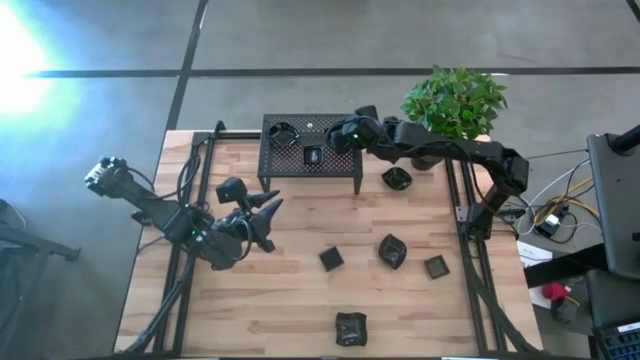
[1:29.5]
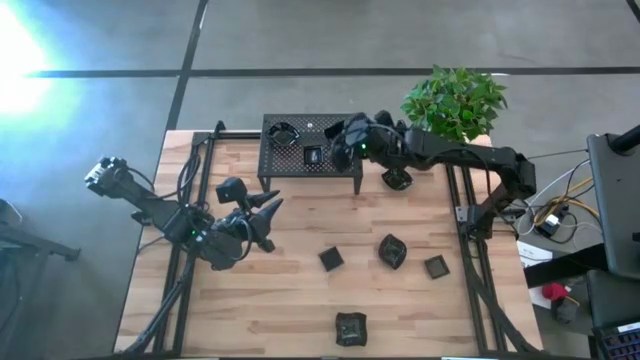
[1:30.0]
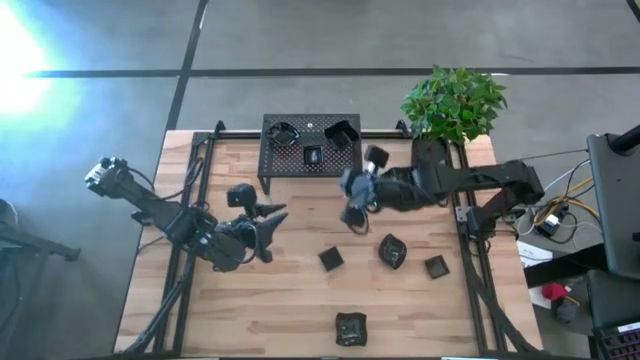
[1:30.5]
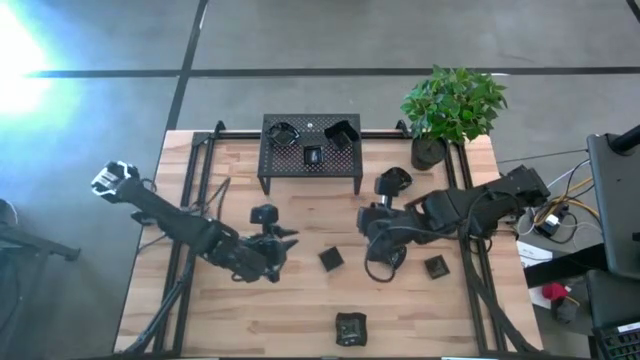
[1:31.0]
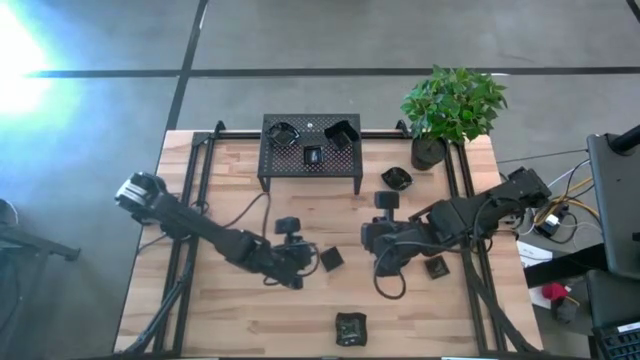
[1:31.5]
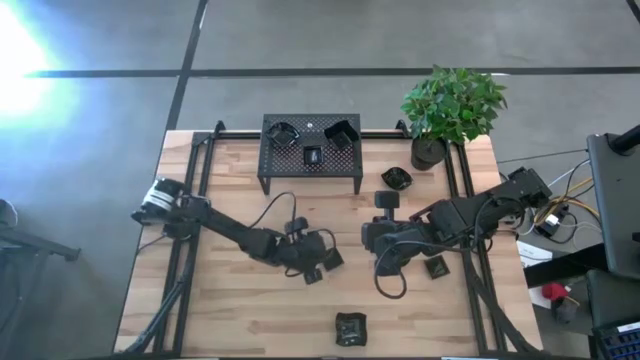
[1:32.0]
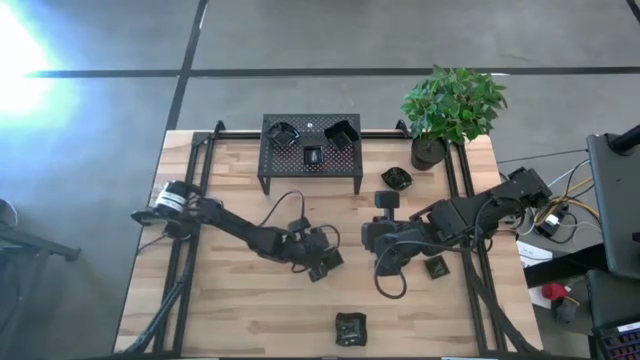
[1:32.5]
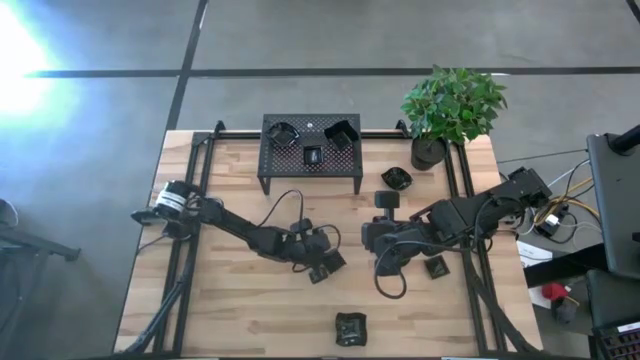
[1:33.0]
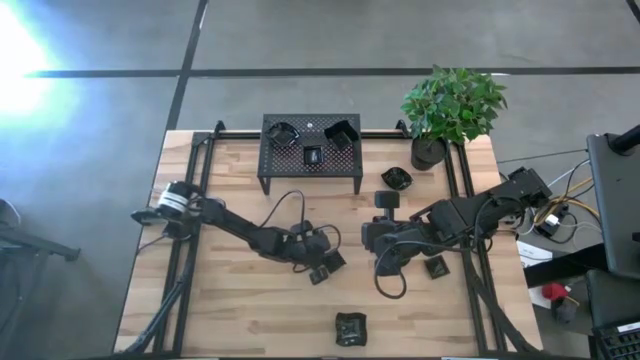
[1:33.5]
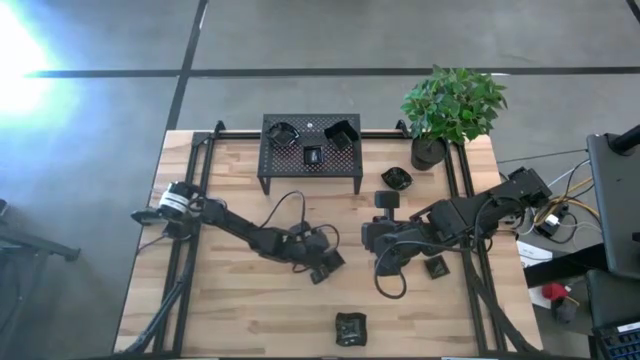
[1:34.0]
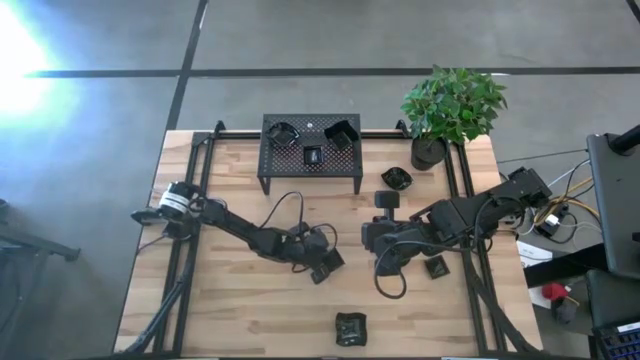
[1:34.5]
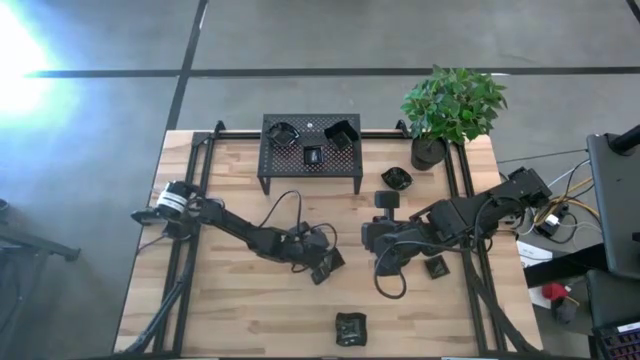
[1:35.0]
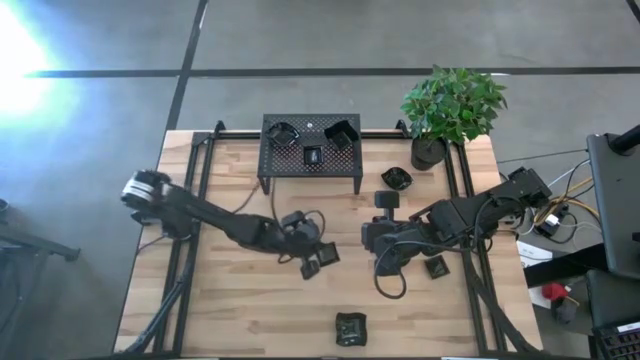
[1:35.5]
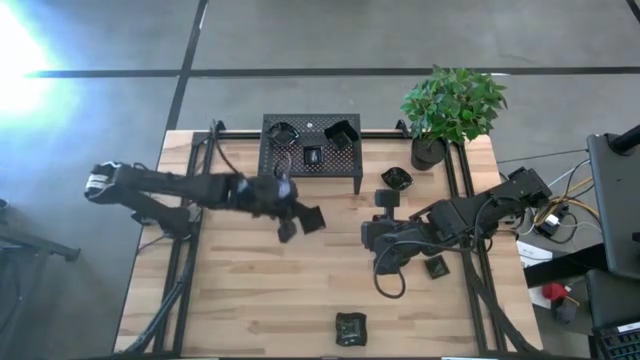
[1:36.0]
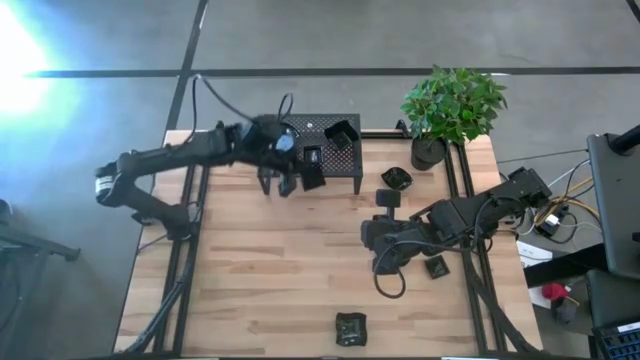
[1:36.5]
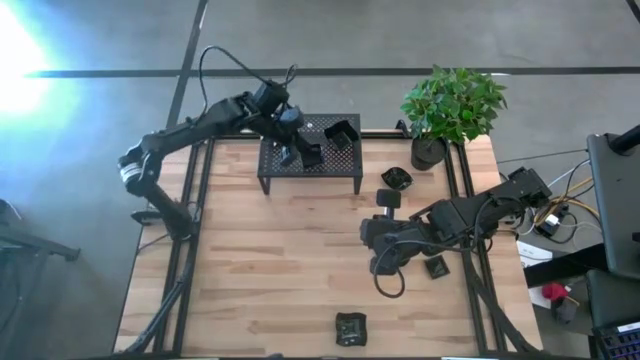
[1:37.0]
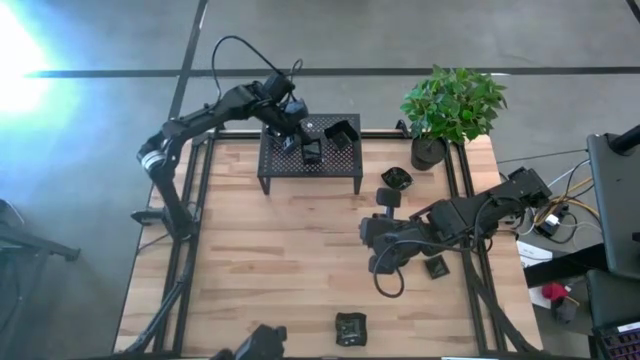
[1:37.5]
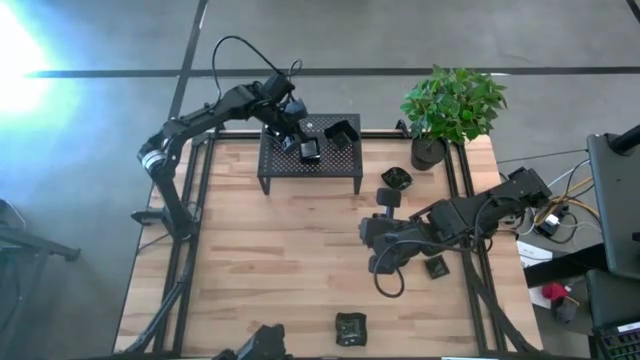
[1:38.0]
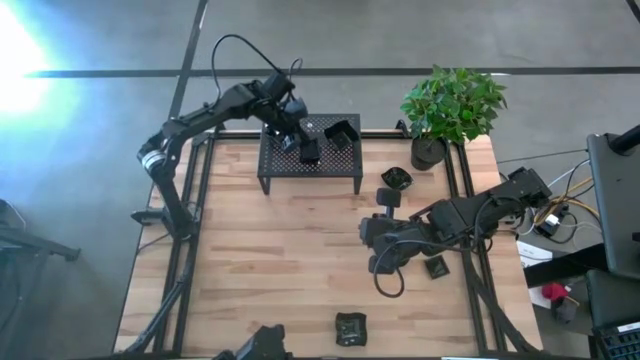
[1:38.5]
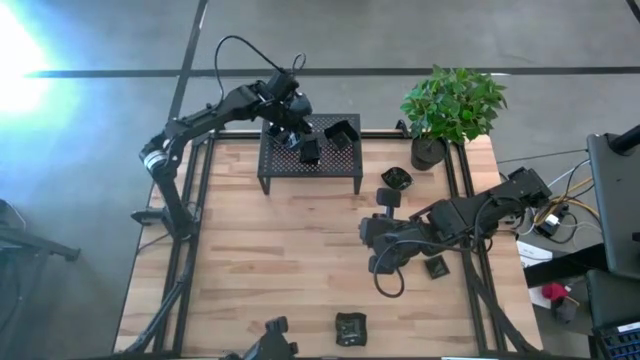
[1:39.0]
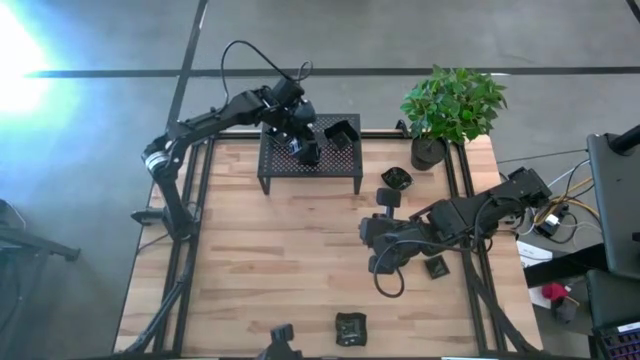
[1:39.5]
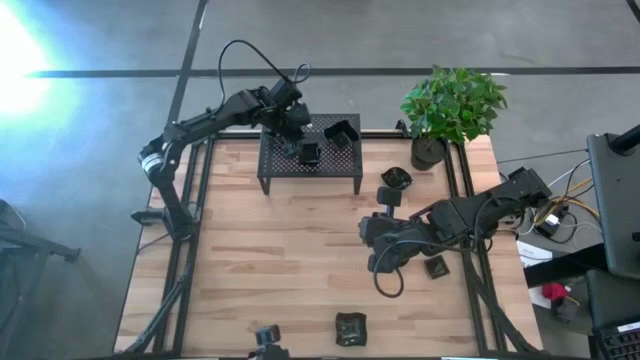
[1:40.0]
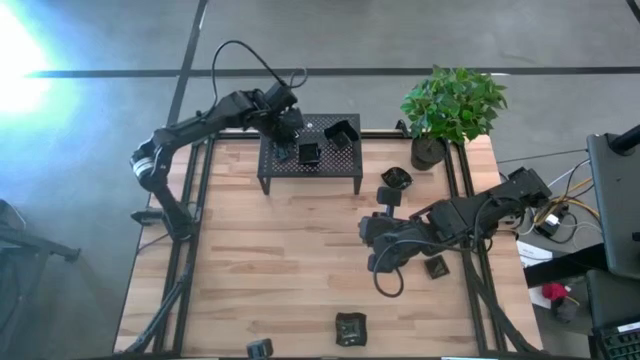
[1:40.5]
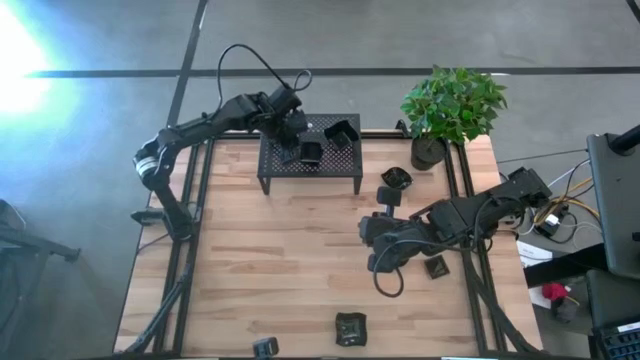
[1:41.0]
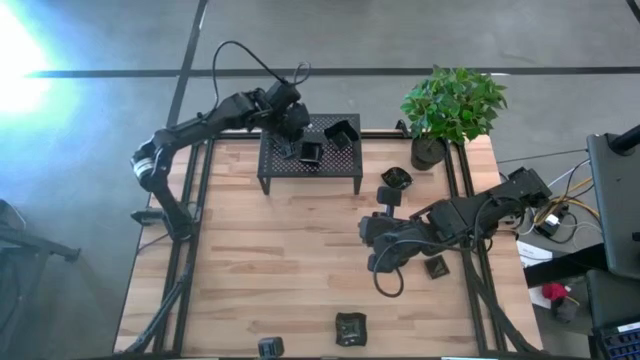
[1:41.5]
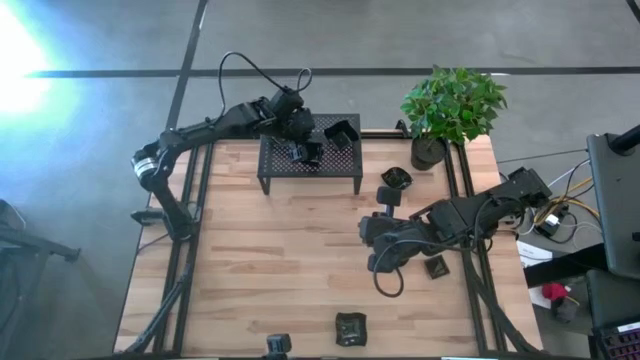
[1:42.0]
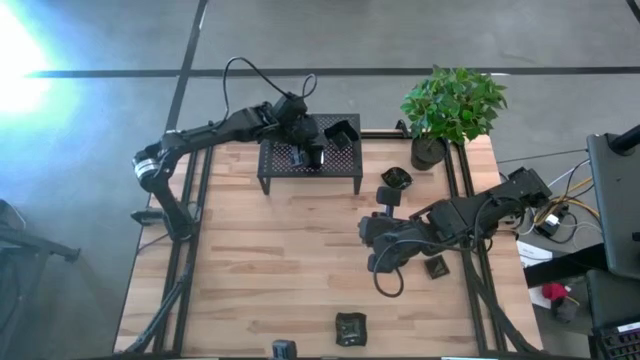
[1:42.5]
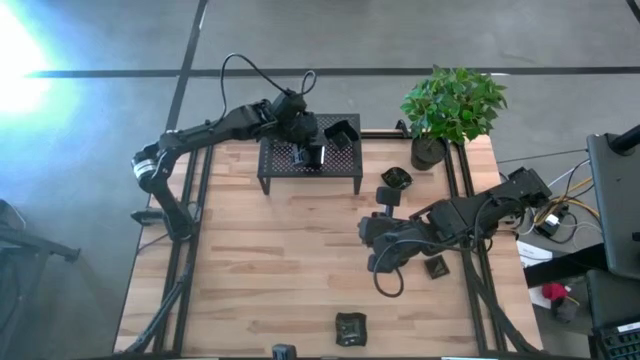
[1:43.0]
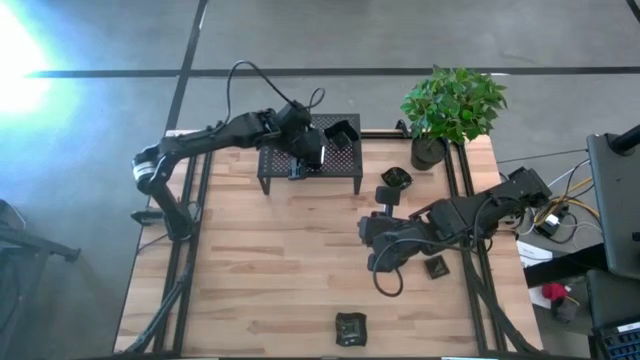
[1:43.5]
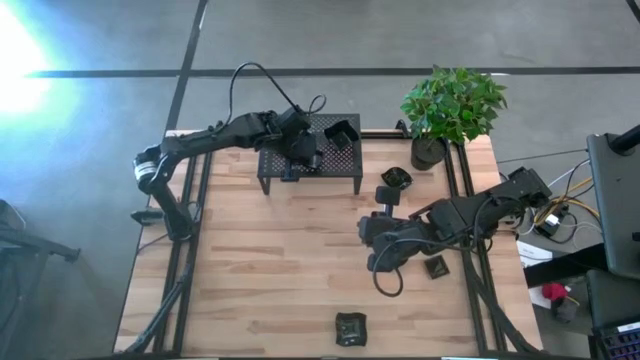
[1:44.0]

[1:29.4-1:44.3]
Task: Pick & Place Mini shaped plates
Stack the square plate on top of the square plates on the shelf

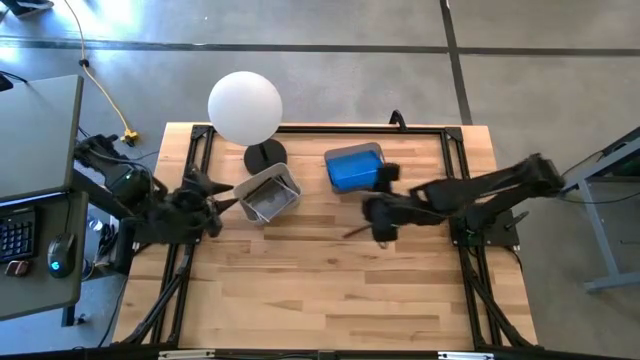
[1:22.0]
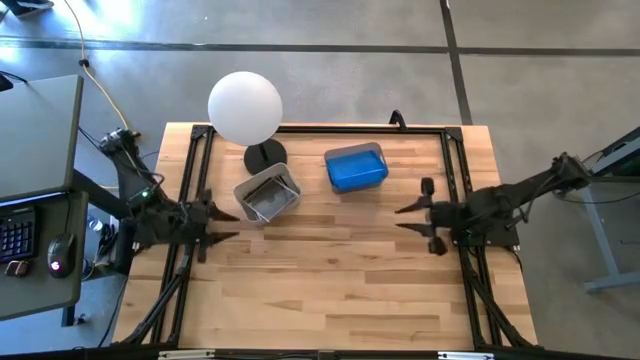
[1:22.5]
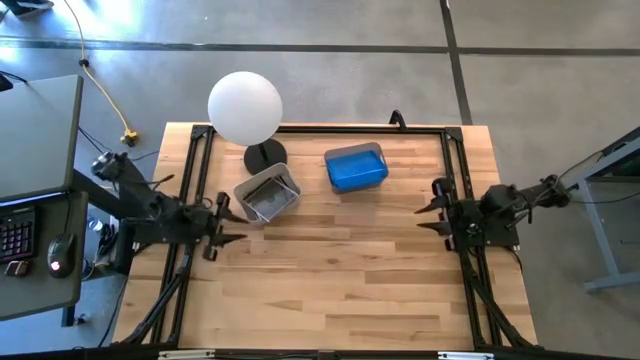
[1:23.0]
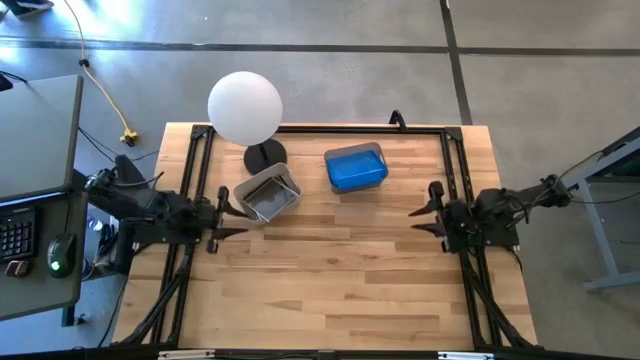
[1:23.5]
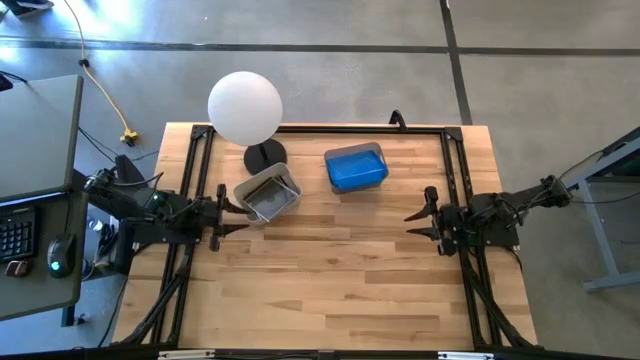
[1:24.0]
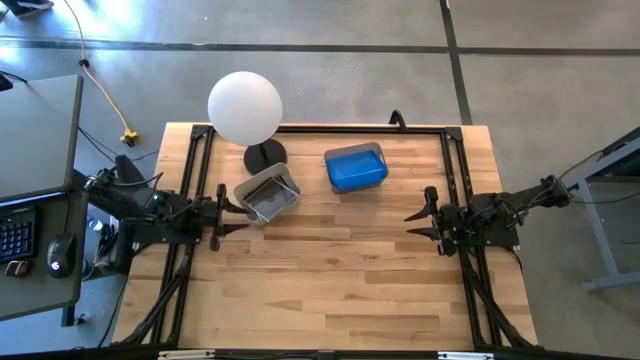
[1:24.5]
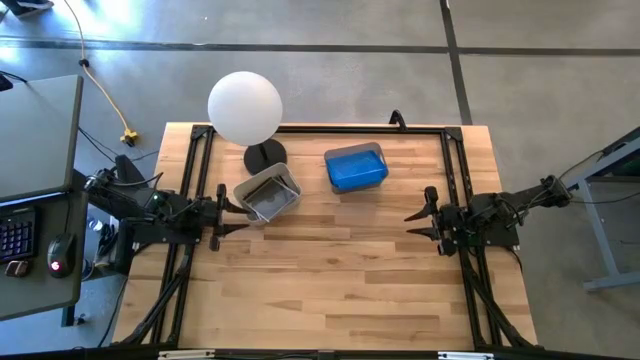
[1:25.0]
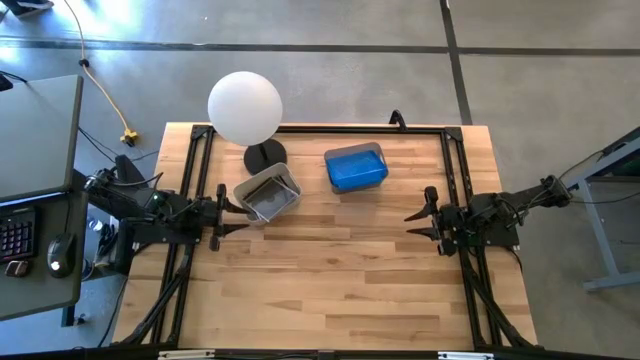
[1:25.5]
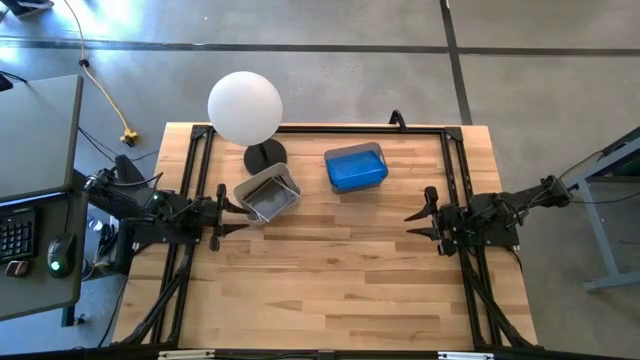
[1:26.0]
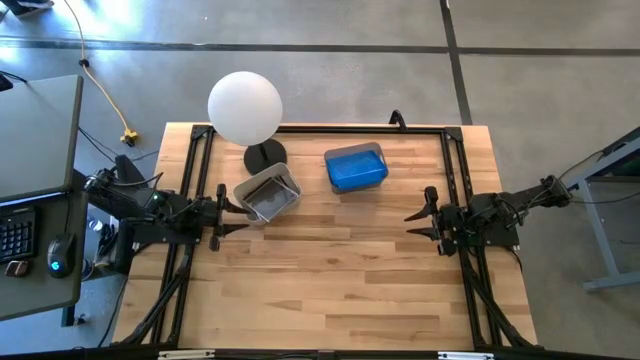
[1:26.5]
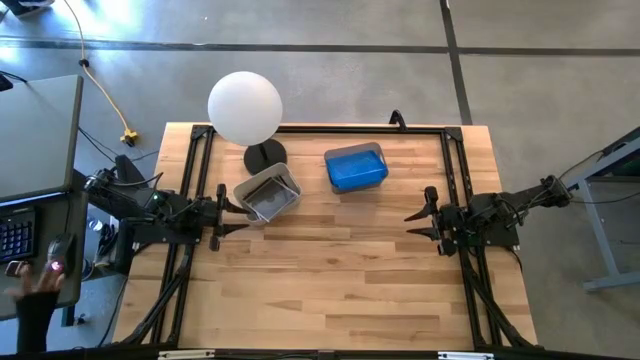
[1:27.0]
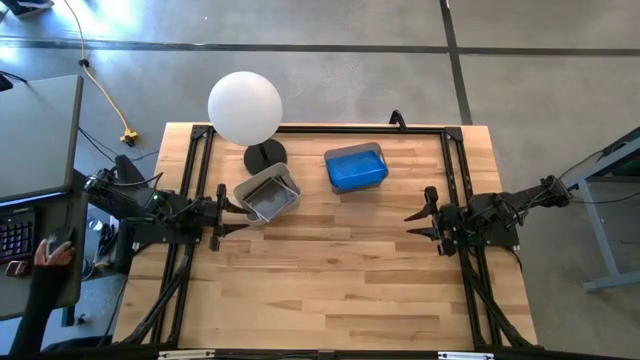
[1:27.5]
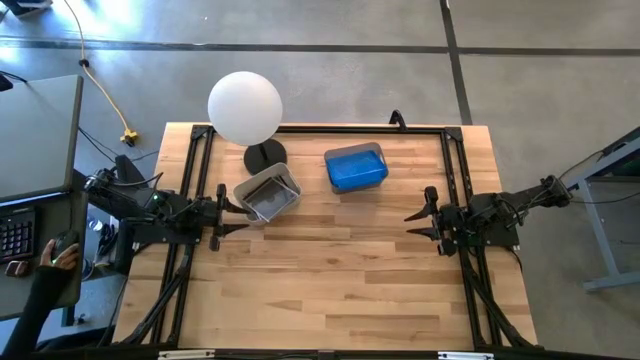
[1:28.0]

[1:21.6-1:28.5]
Task: Pick & place jewel cases by type
Return to Home Position

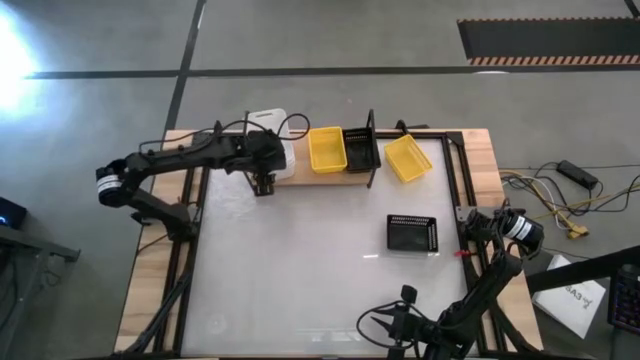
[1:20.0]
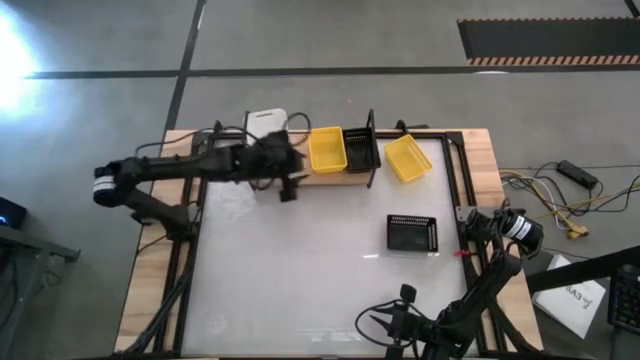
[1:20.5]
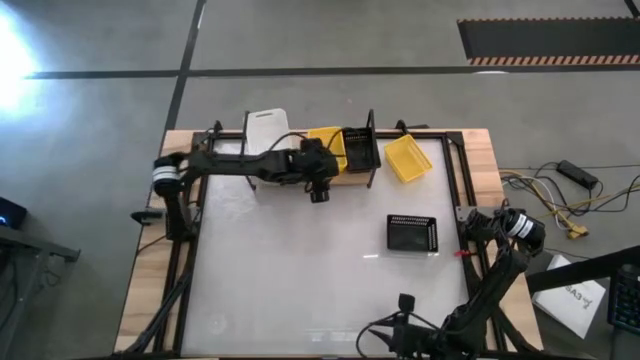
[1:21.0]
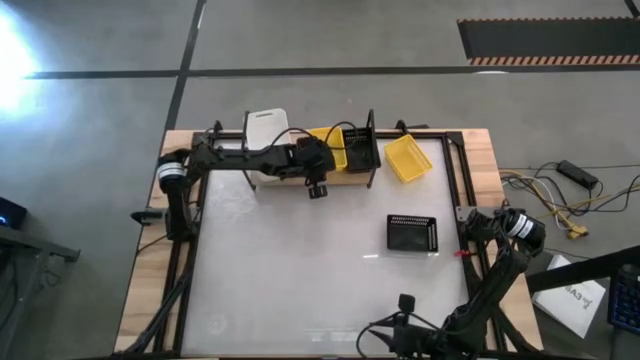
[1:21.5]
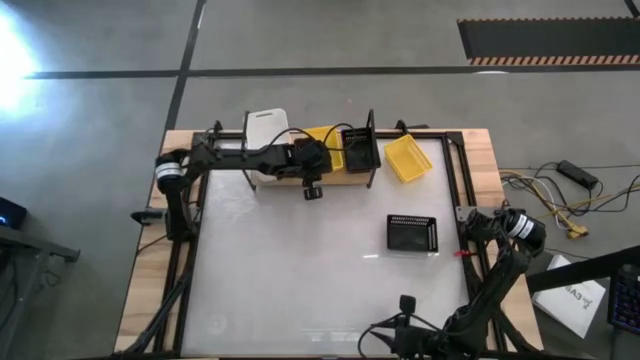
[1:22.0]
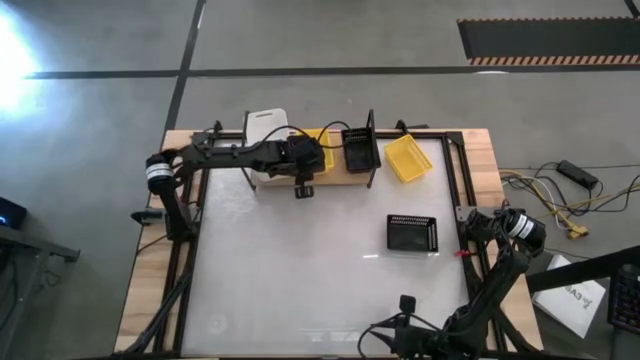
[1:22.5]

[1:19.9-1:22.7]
Task: Stack baskets on shelf by color
Adjust the stacked yellow bins on the shelf
